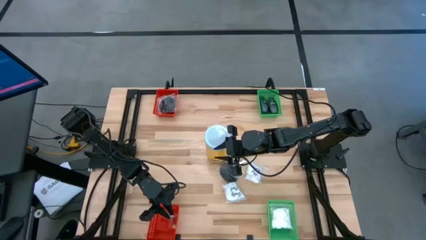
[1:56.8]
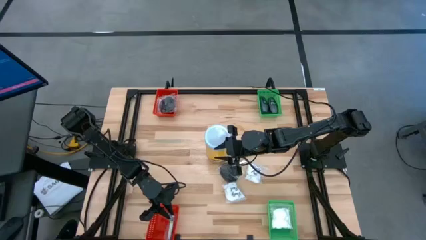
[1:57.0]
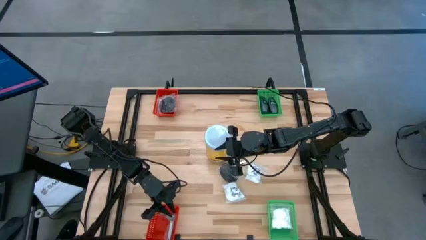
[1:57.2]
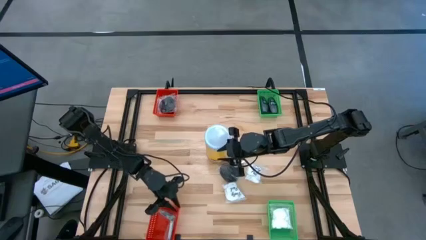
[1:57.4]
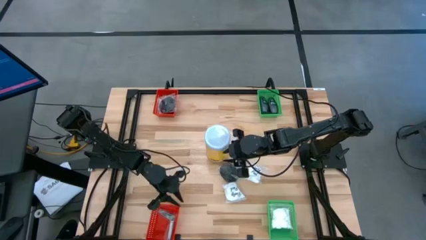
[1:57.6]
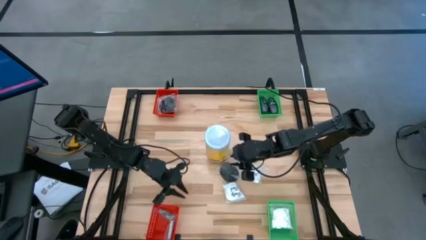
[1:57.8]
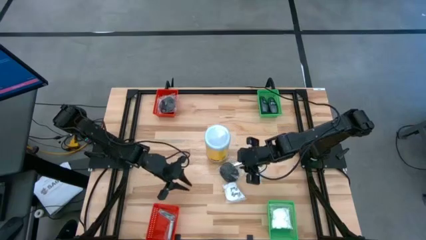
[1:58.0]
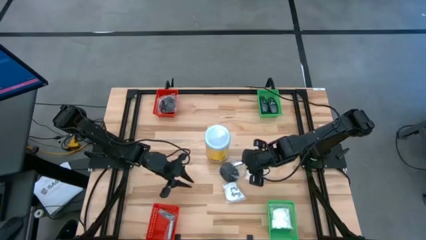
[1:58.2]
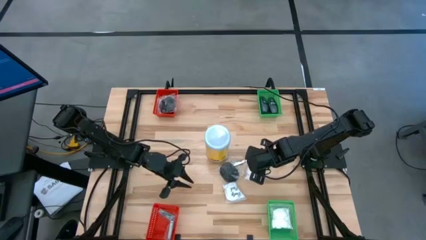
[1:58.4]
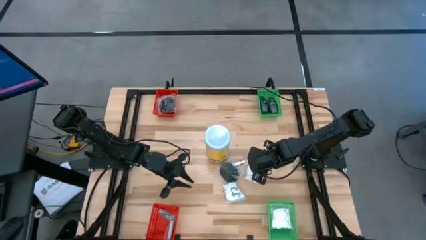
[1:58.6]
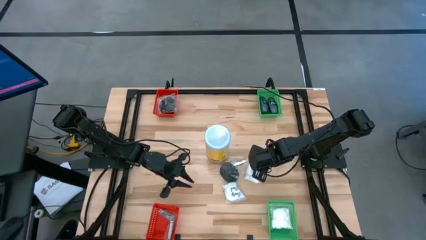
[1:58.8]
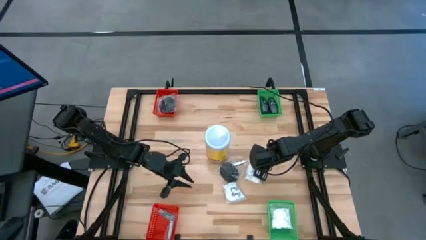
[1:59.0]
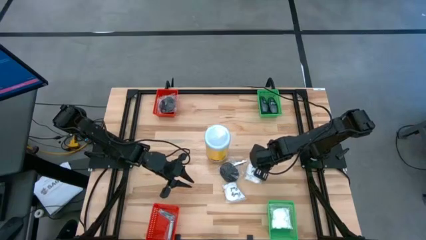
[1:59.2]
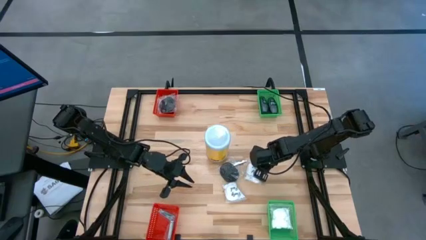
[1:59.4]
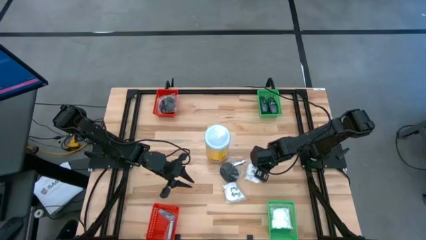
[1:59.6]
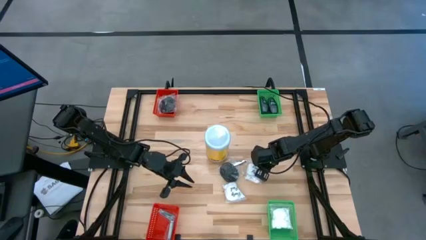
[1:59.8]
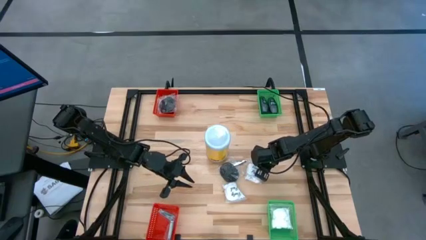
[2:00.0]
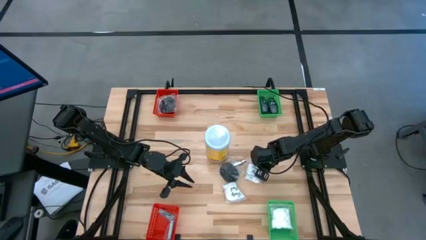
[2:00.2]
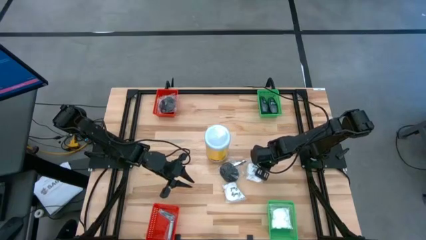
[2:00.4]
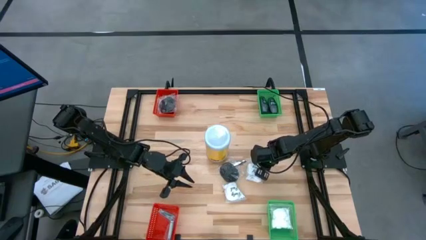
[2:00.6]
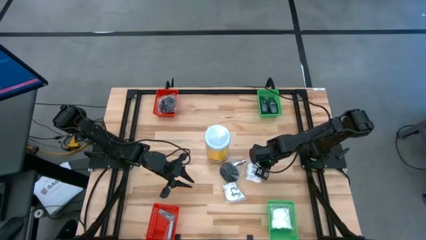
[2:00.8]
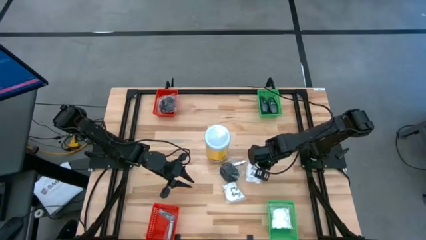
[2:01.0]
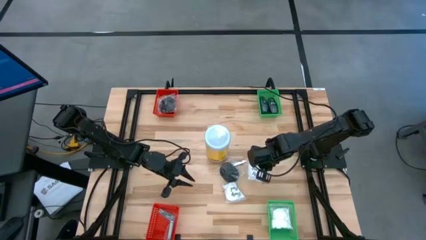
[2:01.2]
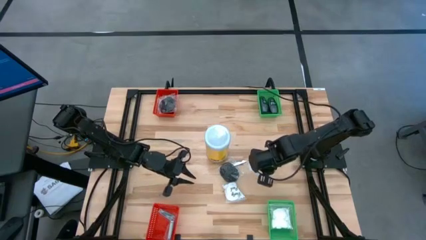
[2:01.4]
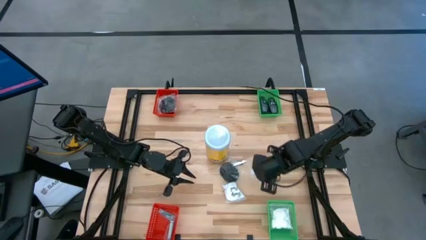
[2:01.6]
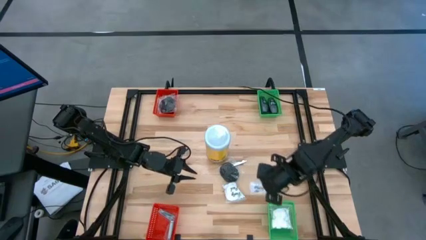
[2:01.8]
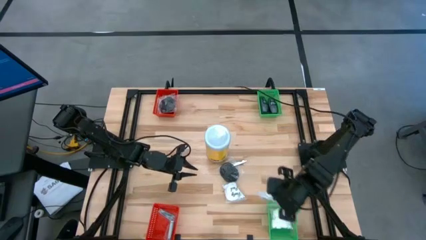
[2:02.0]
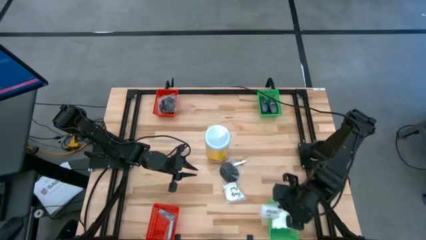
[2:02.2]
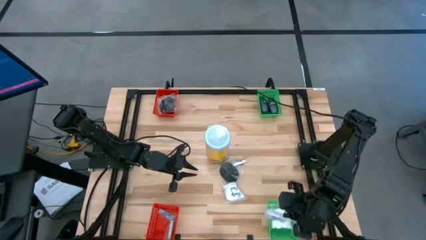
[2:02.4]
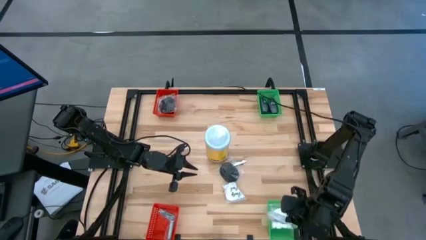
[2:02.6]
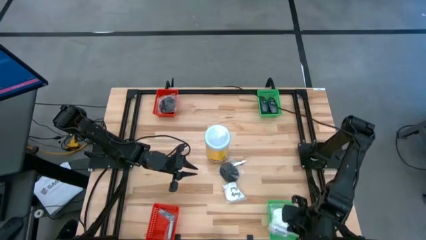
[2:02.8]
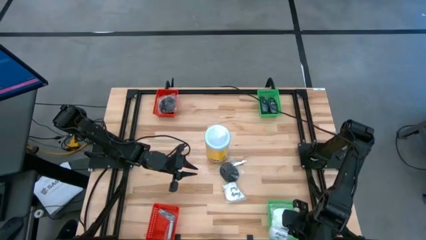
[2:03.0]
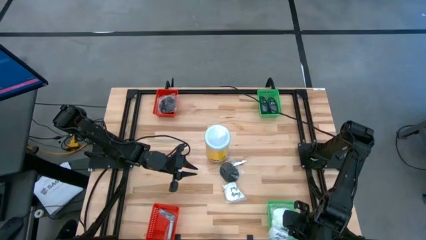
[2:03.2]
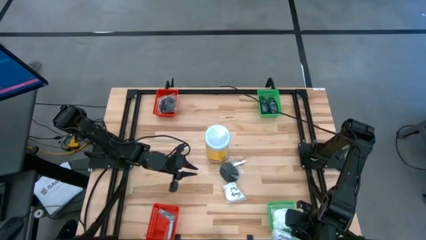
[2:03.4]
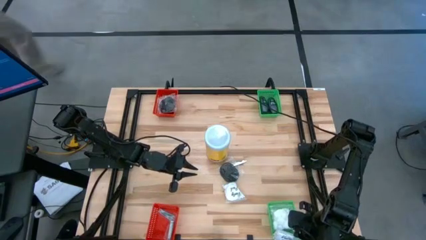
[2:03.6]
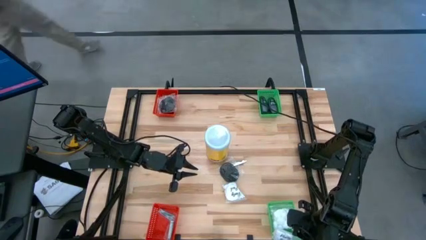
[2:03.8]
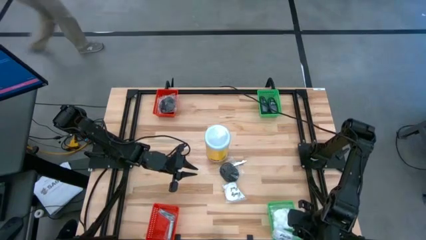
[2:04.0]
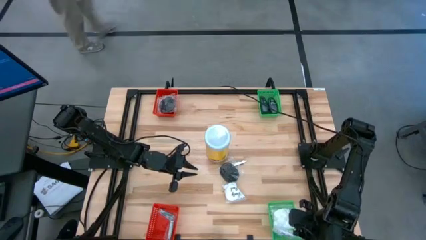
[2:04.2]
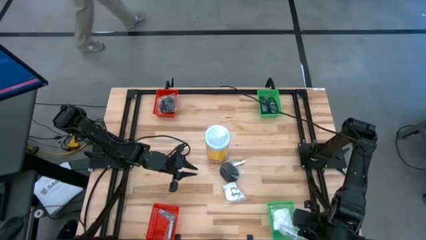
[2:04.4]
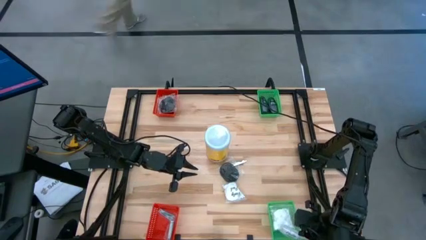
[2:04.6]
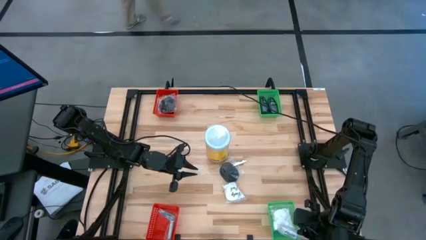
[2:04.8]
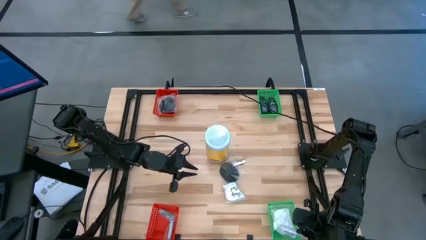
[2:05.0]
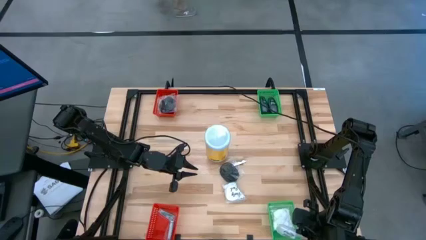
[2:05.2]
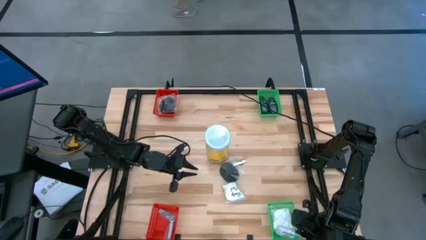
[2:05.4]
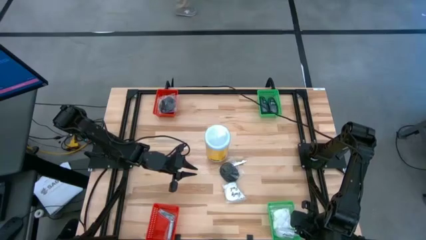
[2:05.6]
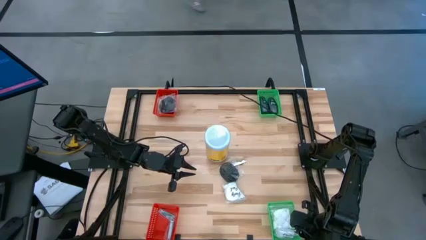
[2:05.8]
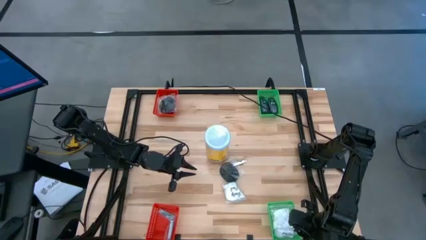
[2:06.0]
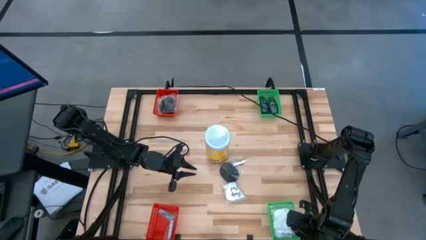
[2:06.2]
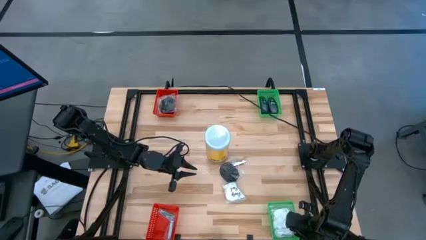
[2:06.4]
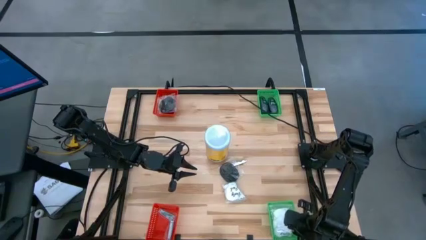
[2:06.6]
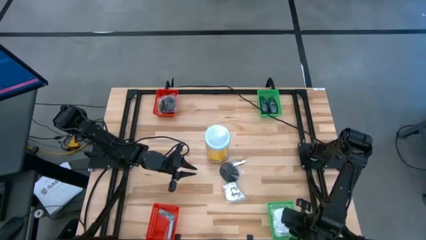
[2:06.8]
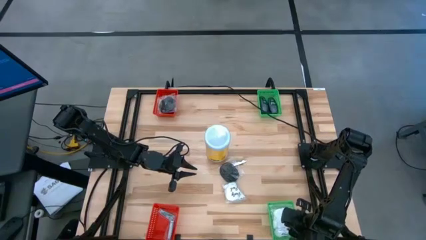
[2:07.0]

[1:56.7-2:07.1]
Task: Pick & Place Travel size toiletries
Put the white cotton pack into the bottom green bin

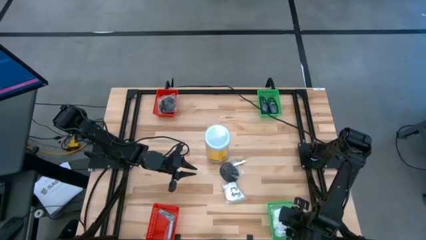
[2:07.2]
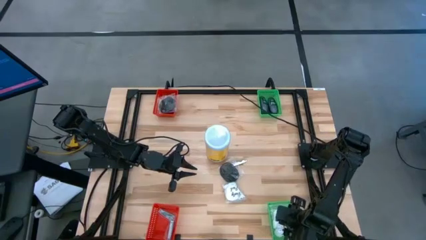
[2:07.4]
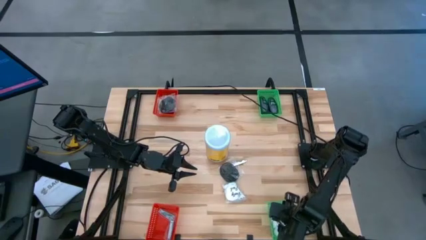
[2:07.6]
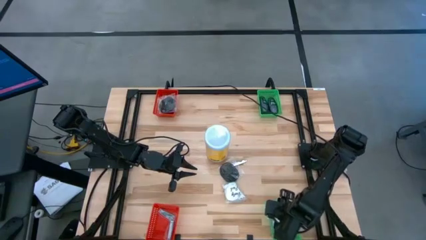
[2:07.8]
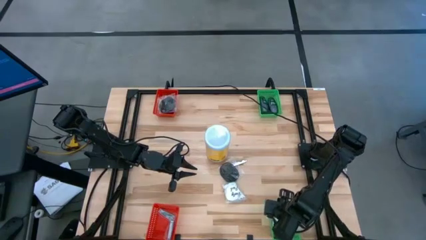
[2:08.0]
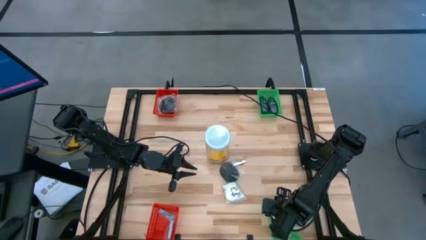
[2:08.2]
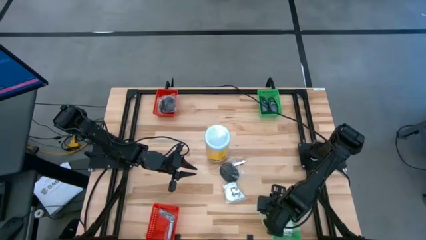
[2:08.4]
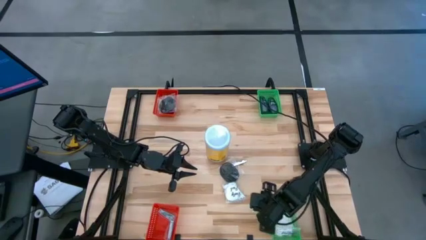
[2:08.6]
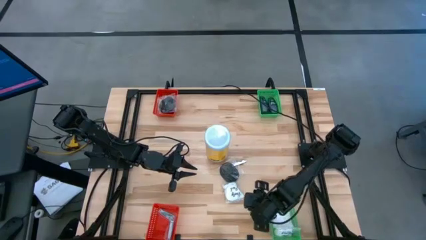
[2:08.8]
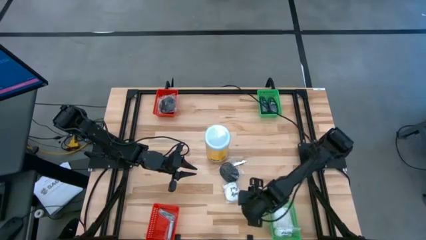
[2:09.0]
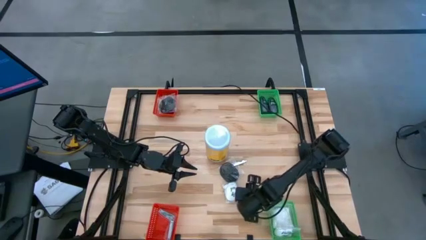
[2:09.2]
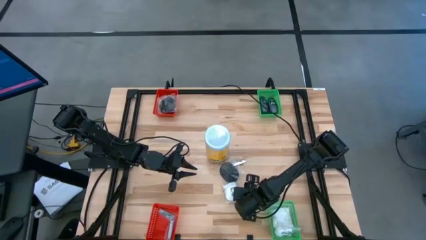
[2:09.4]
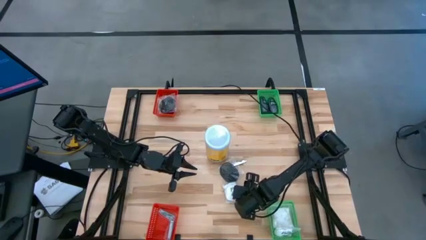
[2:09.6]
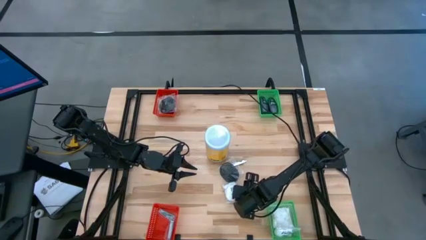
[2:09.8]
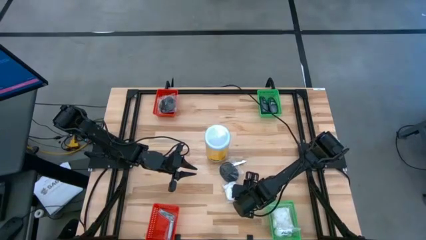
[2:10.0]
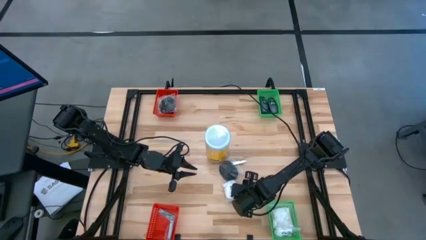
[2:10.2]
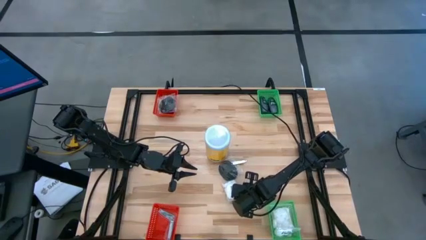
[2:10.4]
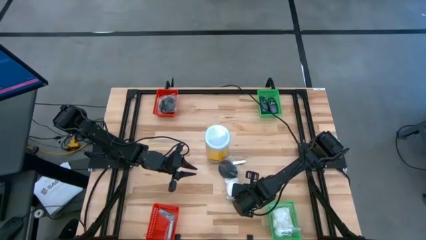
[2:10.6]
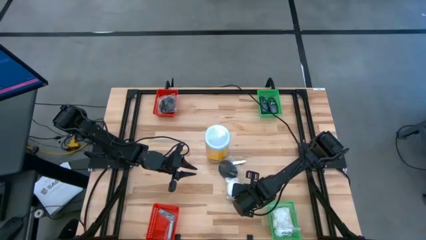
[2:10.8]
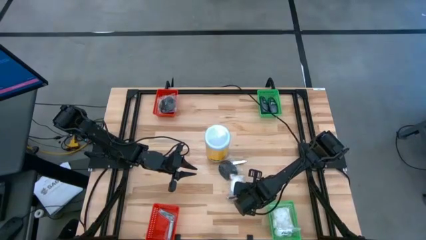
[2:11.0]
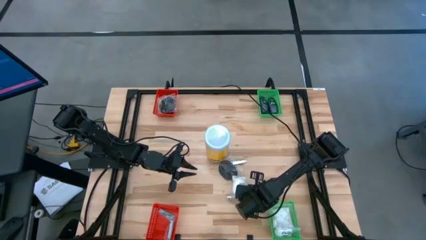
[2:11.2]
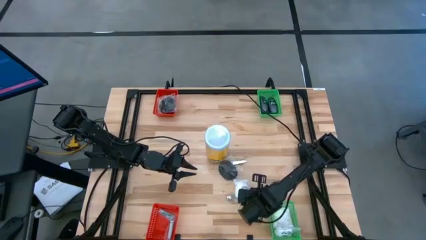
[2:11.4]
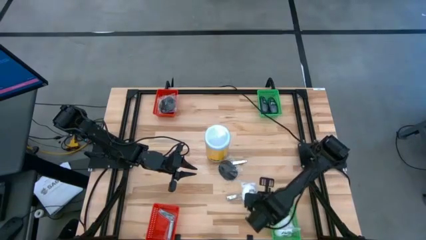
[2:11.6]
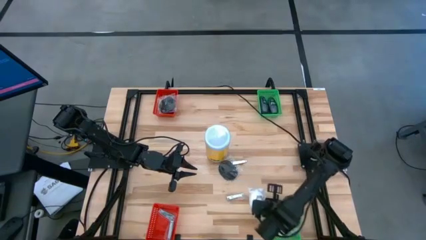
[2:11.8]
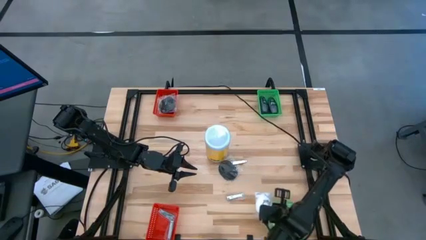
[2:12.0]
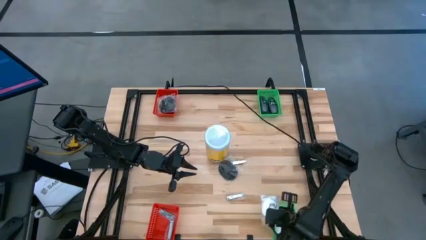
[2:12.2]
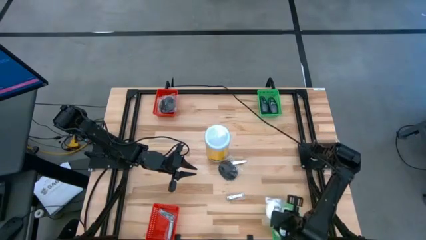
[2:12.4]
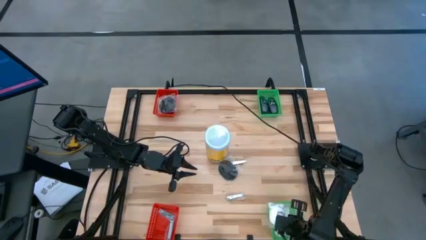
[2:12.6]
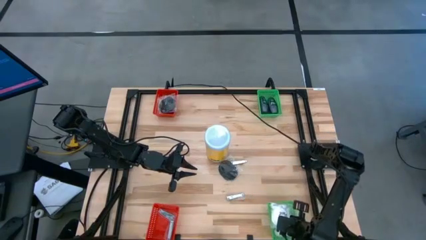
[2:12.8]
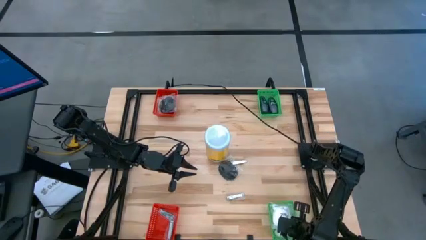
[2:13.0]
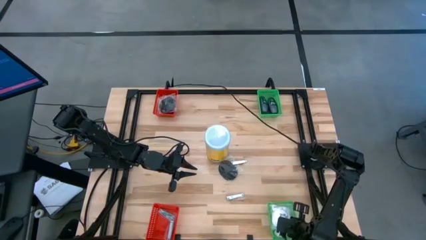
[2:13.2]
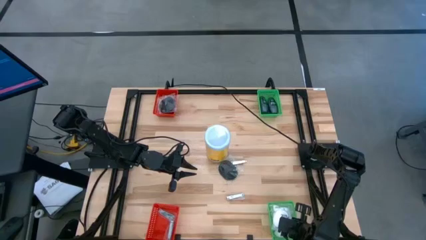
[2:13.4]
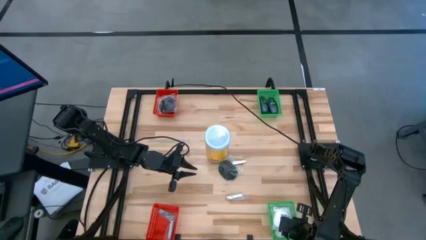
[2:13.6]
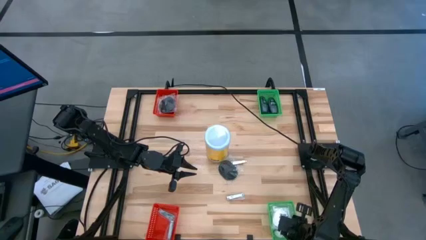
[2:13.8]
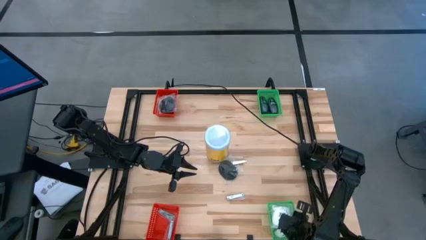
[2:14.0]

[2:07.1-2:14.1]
Put the white cotton pack into the bottom green bin
